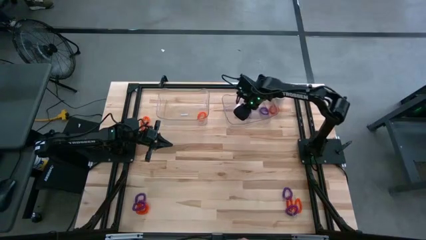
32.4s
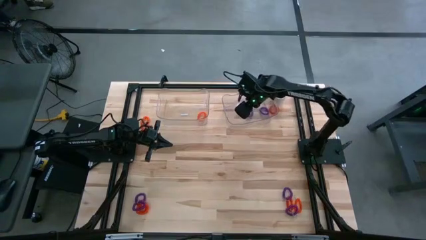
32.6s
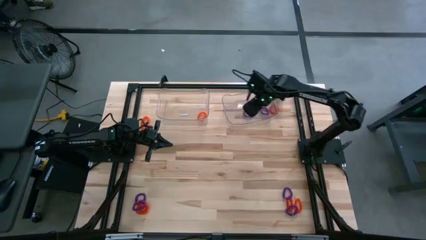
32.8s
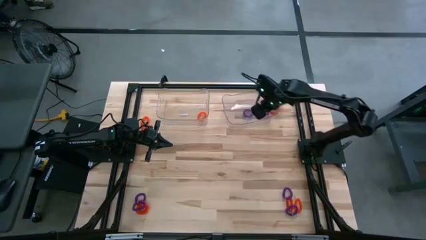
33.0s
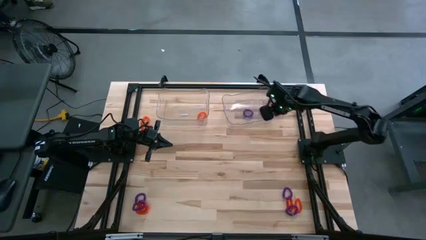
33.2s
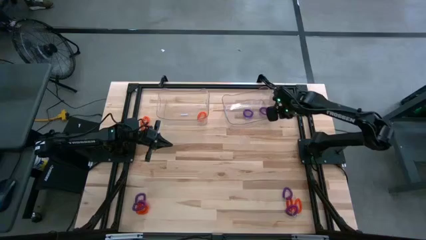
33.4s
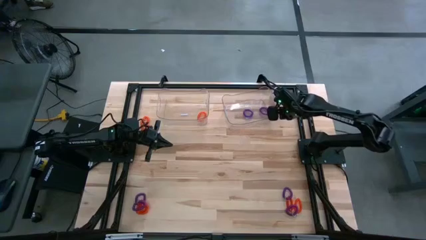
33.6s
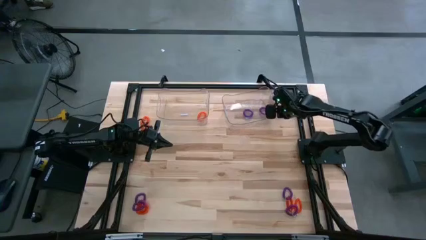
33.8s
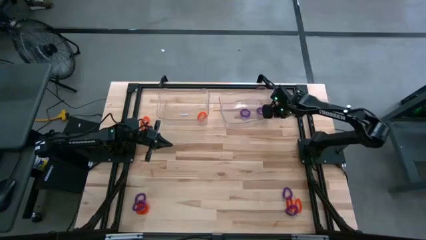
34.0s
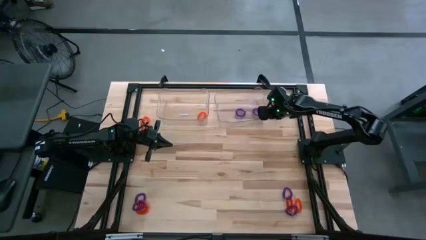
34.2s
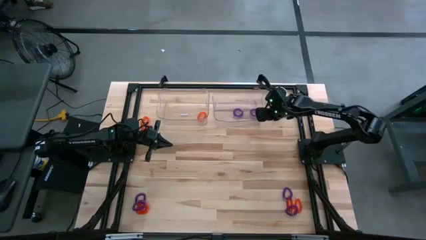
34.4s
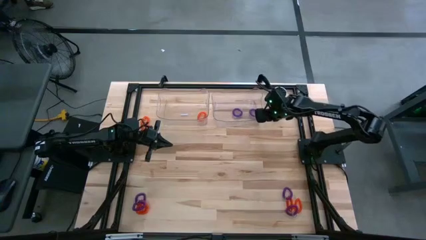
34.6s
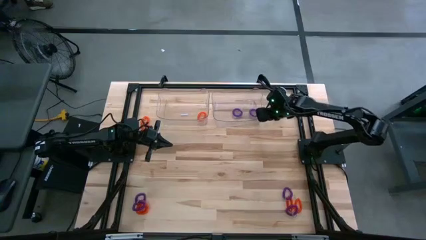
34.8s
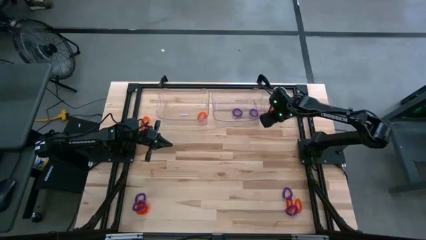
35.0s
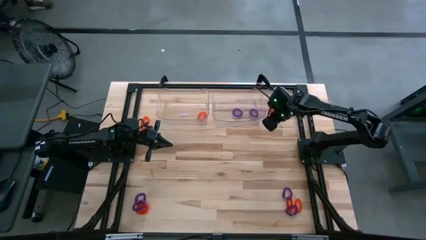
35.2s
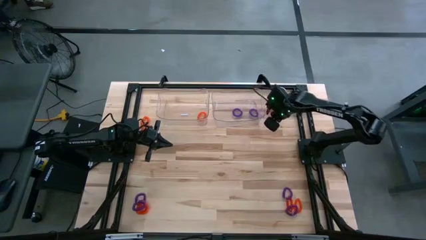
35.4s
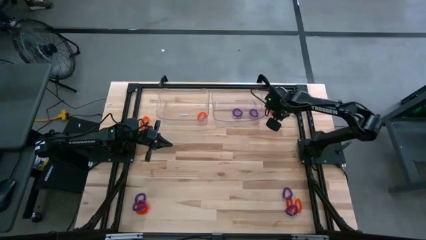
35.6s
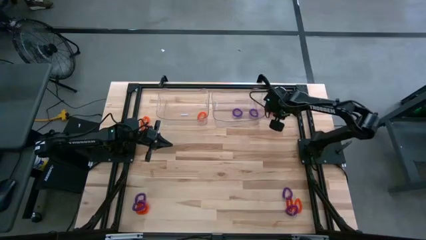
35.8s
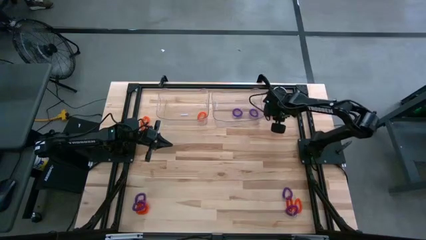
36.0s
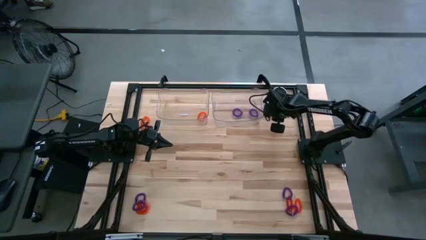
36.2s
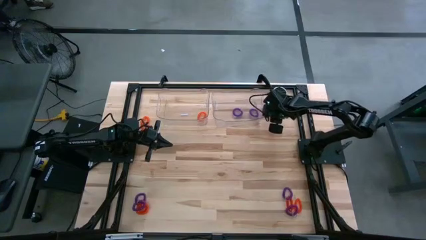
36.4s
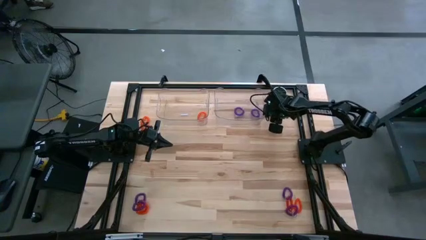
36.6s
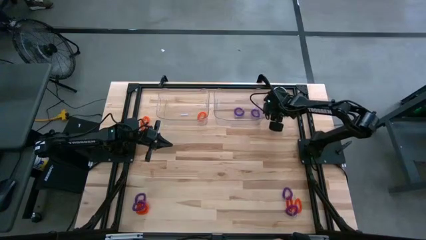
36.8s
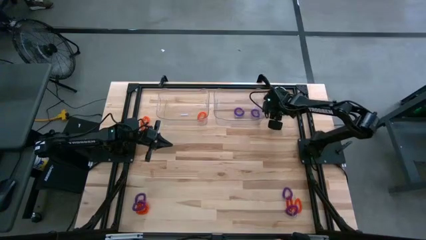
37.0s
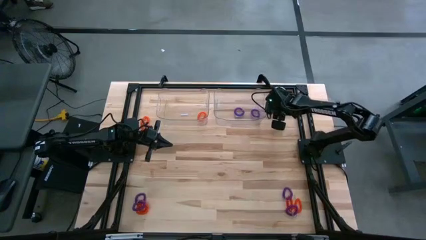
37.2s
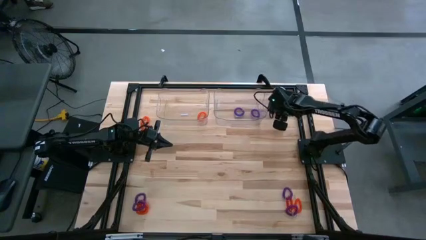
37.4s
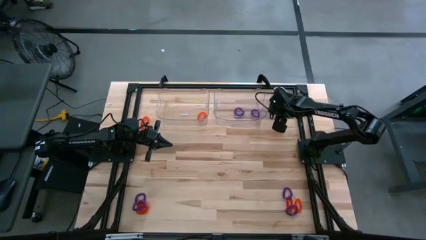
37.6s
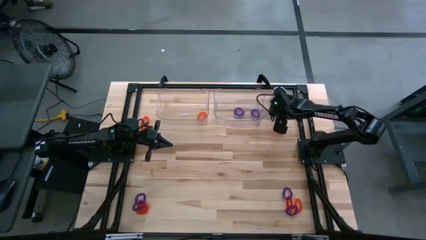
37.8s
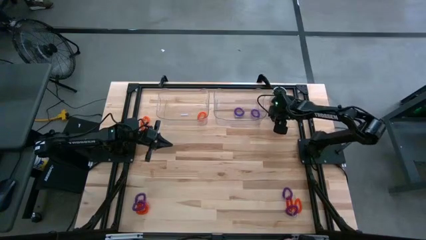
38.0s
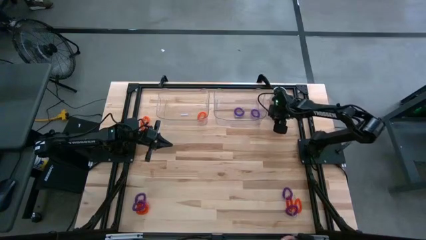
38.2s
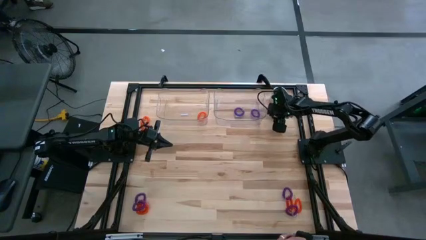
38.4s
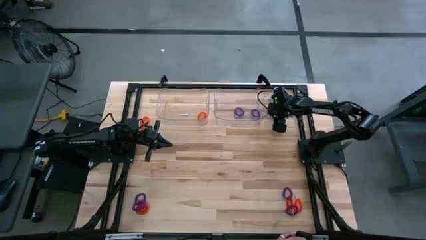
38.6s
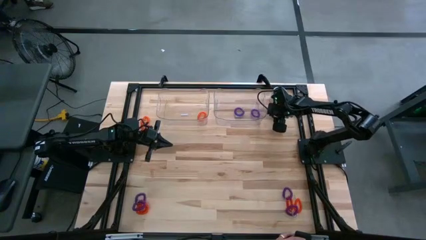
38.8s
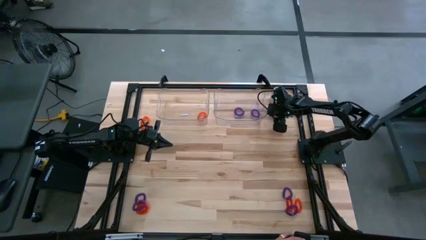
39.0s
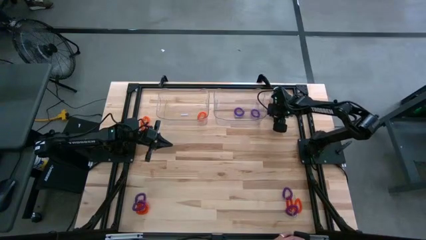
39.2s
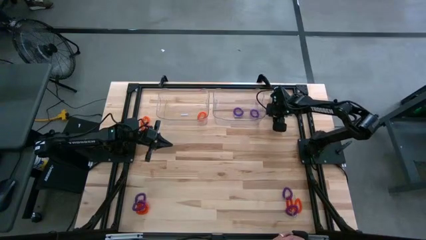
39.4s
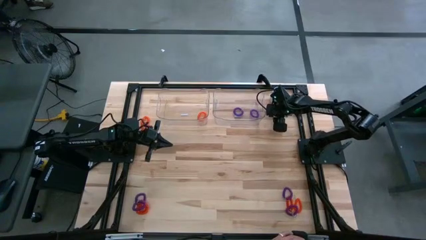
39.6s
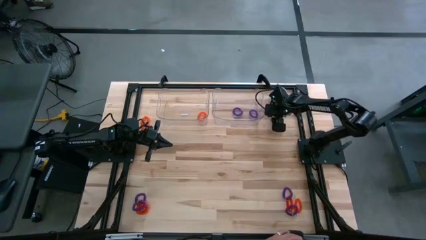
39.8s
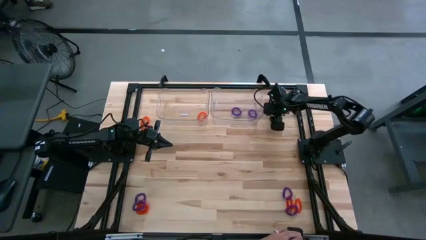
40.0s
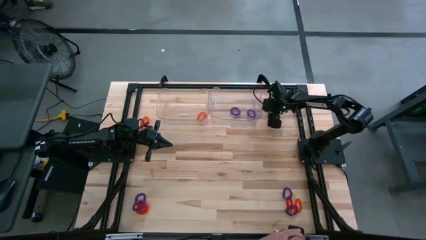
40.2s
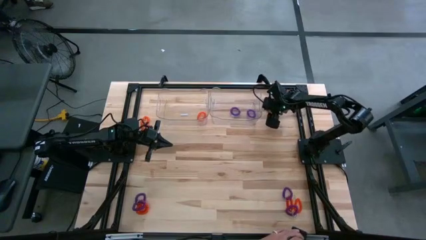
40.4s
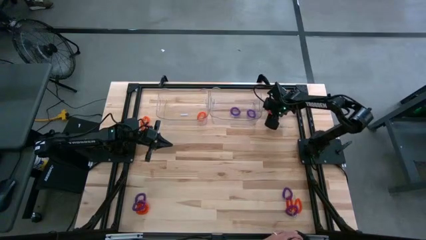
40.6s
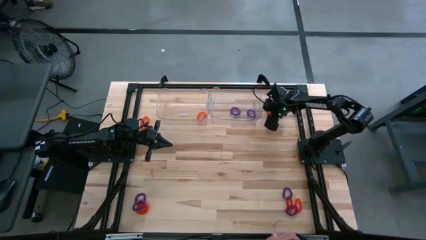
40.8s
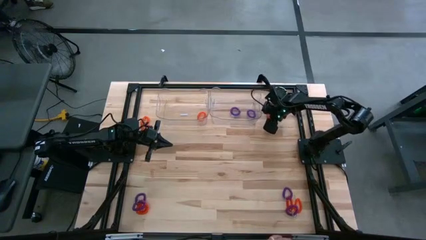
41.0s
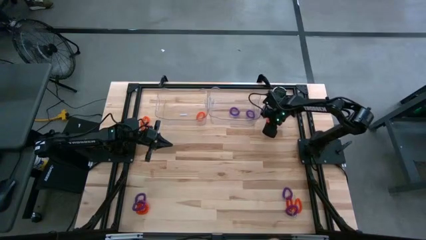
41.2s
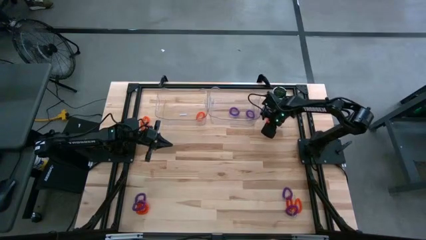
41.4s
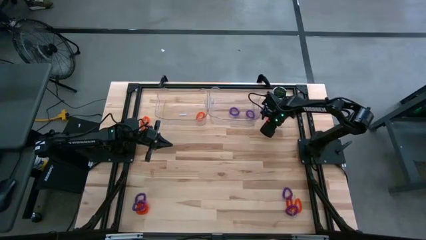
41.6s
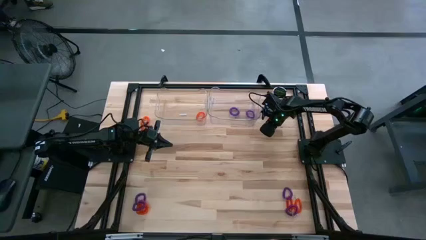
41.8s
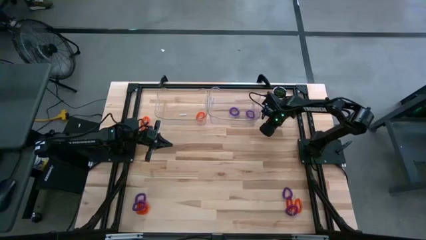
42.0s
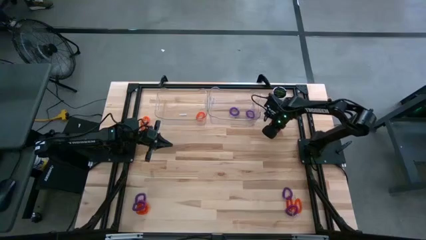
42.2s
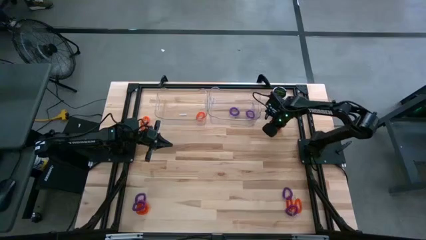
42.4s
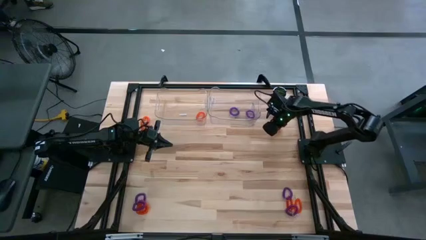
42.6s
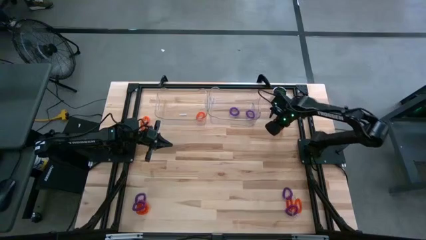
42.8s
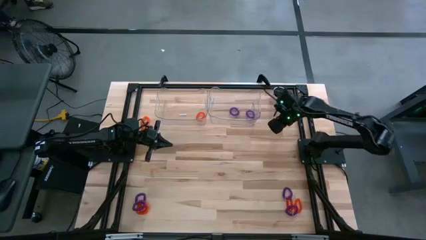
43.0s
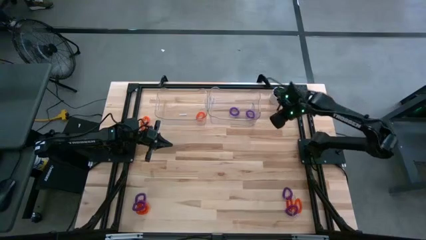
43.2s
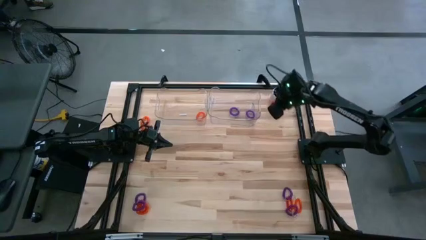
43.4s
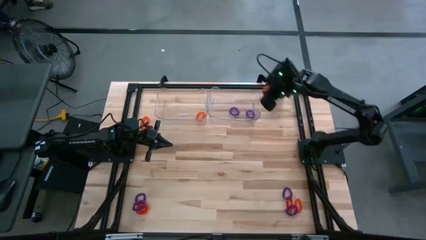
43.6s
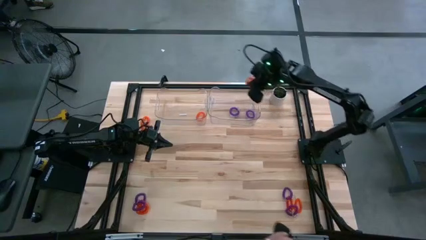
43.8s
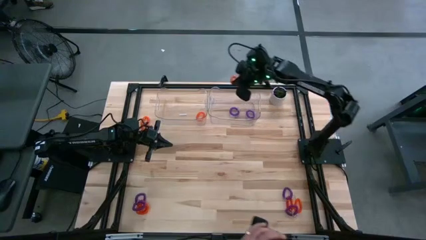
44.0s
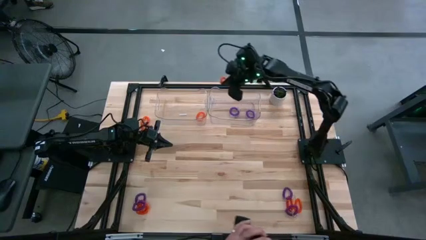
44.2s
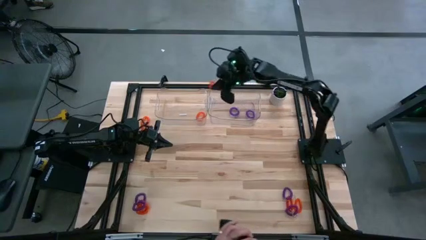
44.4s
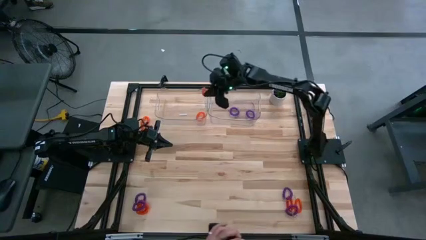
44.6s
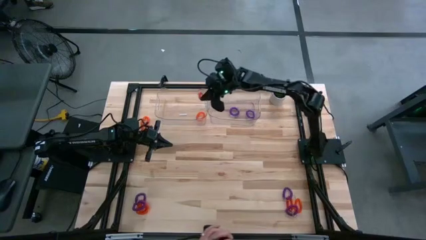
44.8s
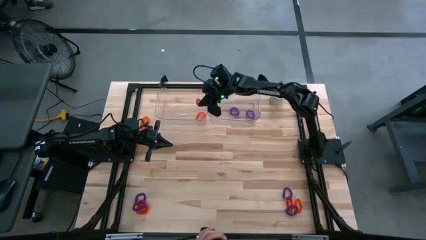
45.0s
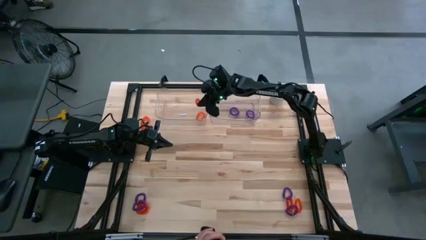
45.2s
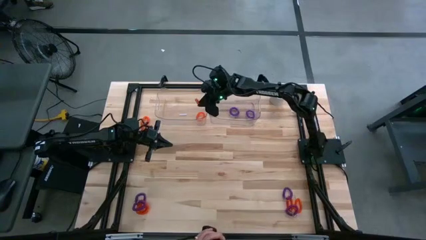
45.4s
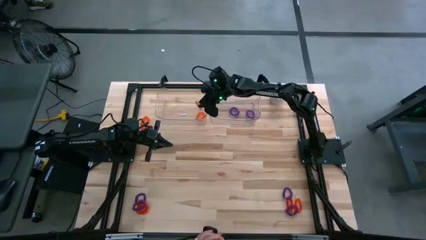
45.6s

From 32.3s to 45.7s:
Task: Sort spring keychains
Put the orange spring keychain into the left transparent bin
